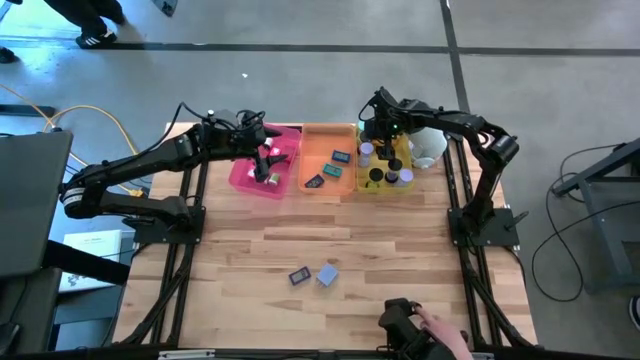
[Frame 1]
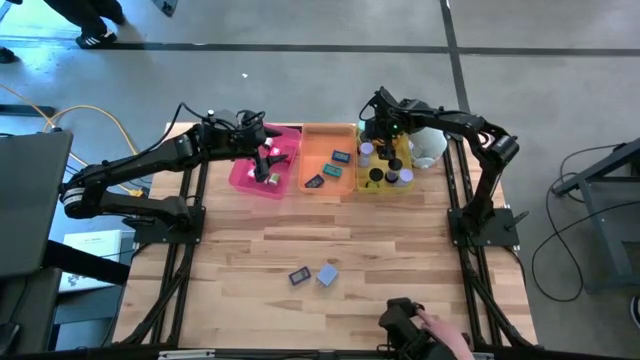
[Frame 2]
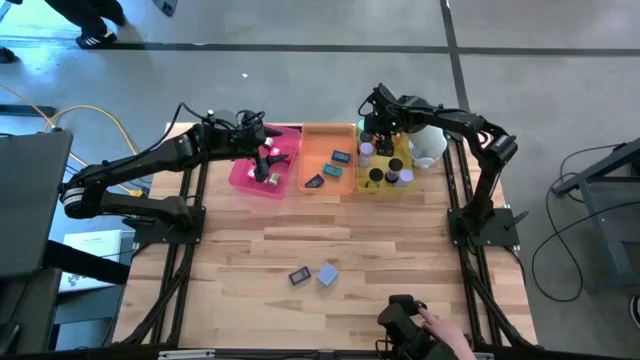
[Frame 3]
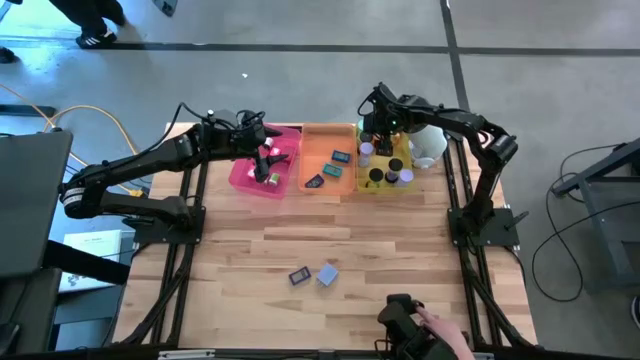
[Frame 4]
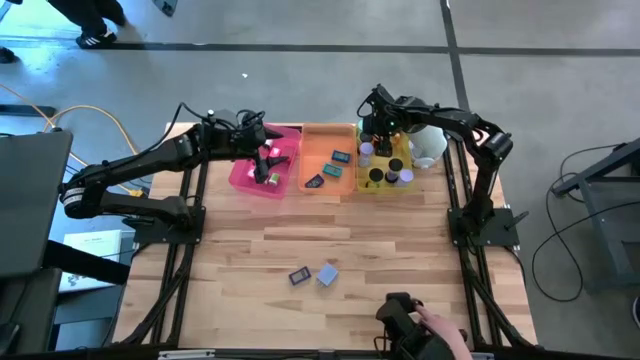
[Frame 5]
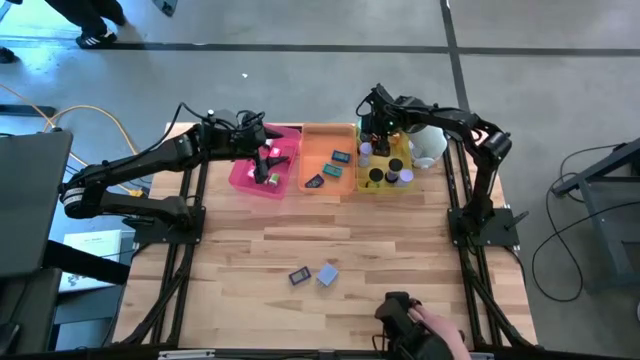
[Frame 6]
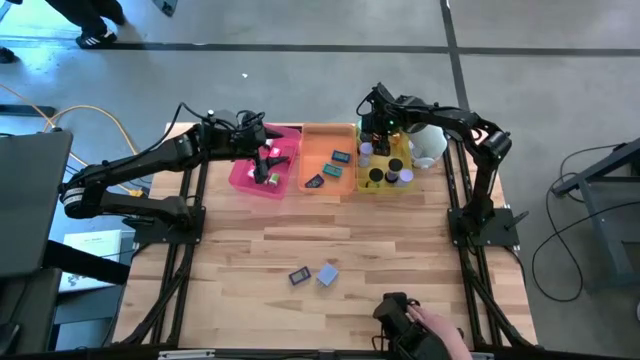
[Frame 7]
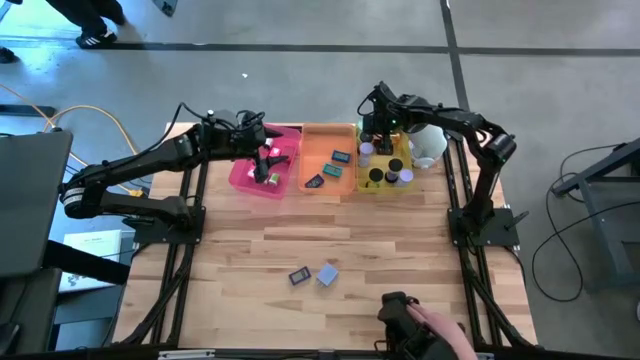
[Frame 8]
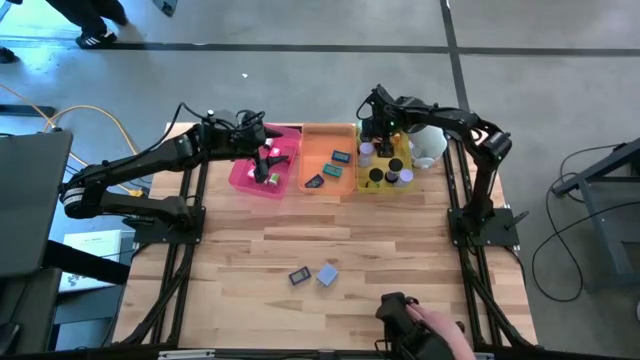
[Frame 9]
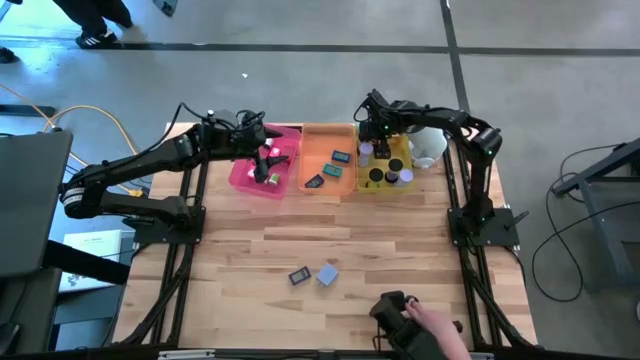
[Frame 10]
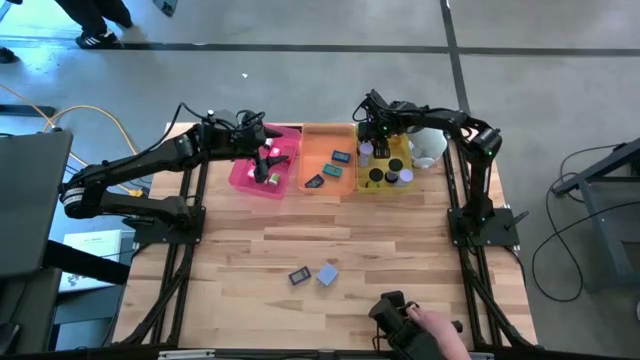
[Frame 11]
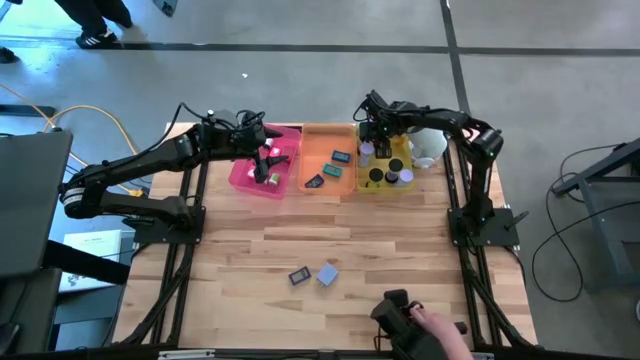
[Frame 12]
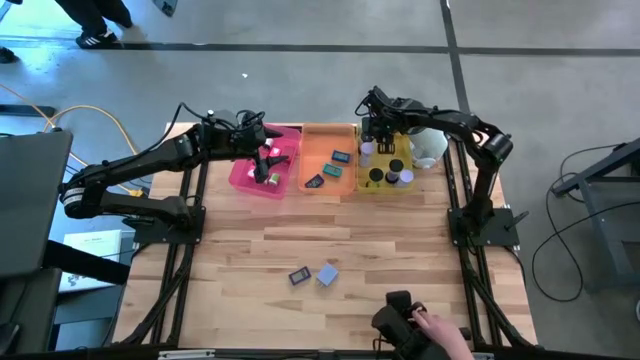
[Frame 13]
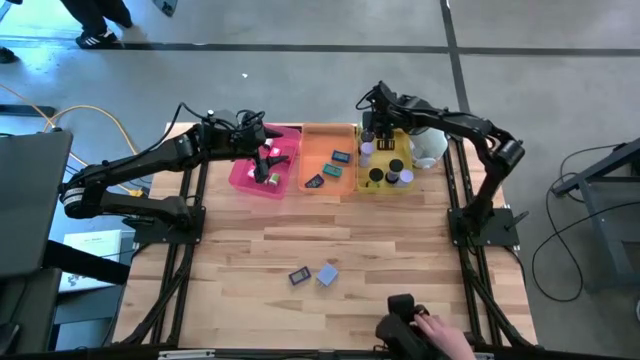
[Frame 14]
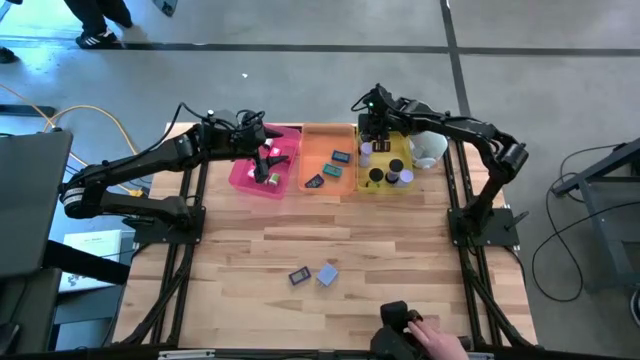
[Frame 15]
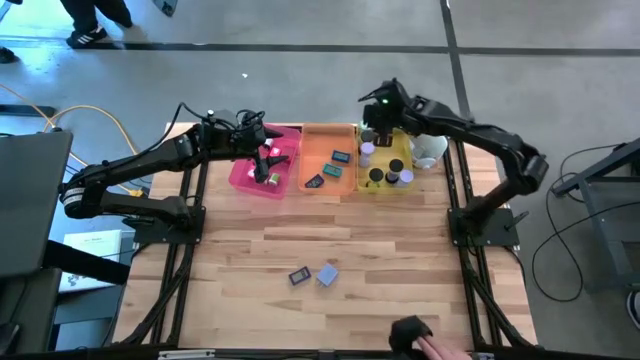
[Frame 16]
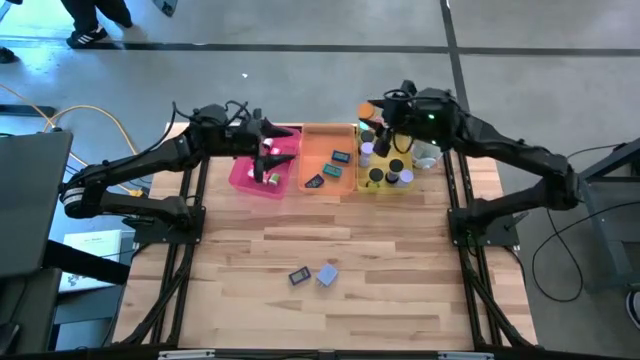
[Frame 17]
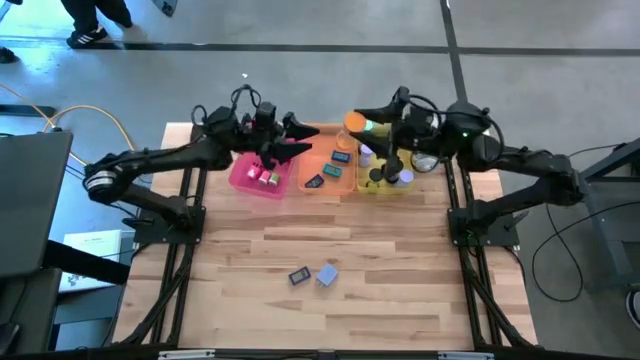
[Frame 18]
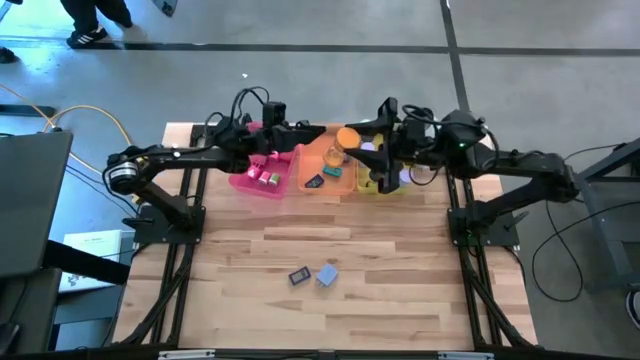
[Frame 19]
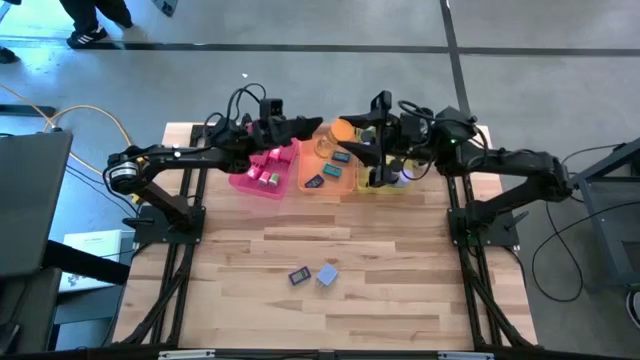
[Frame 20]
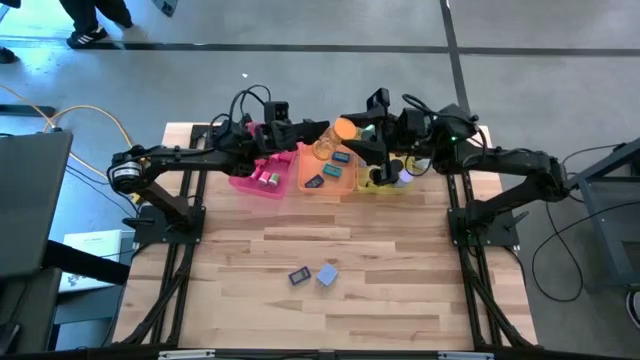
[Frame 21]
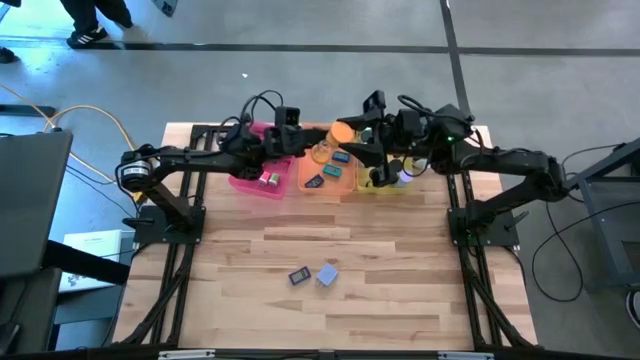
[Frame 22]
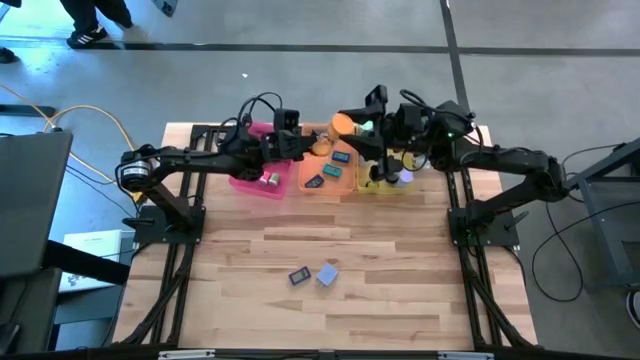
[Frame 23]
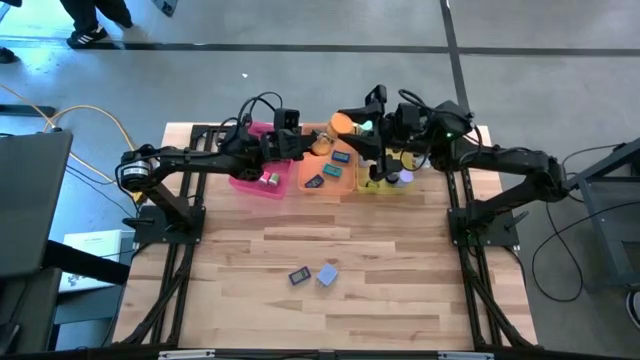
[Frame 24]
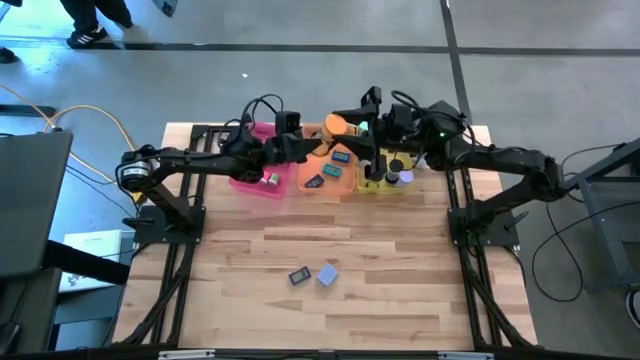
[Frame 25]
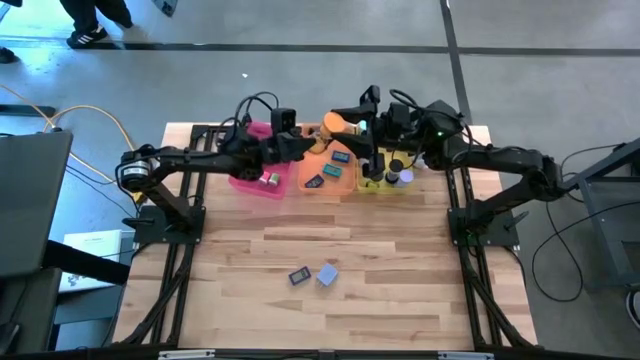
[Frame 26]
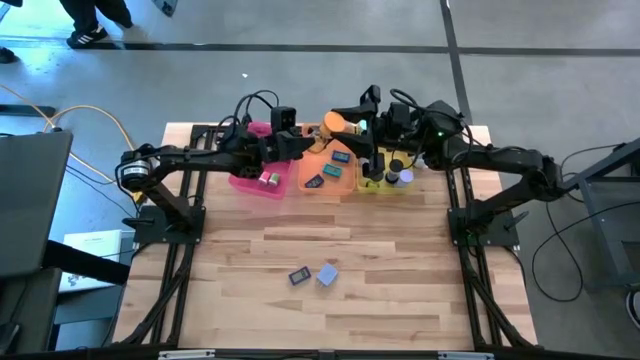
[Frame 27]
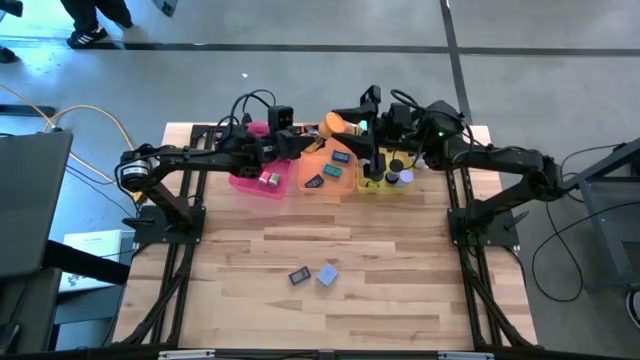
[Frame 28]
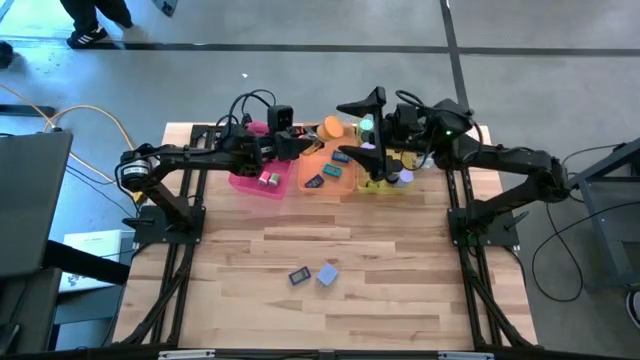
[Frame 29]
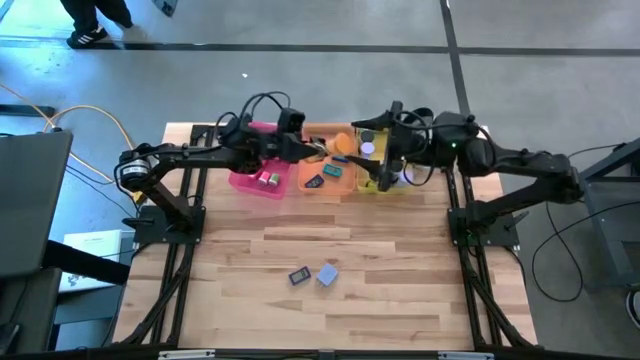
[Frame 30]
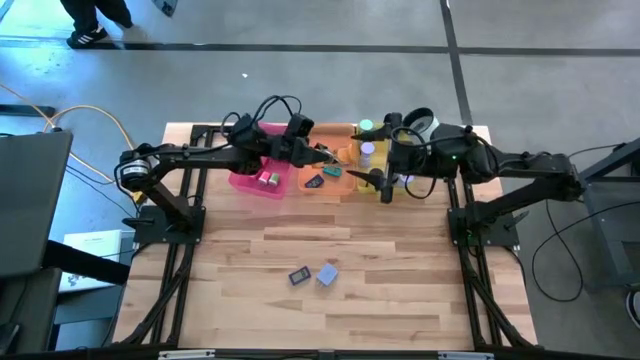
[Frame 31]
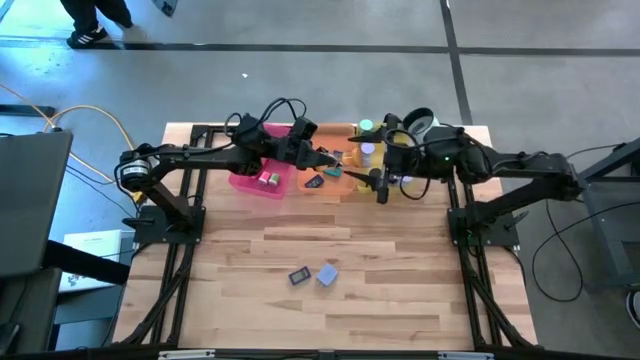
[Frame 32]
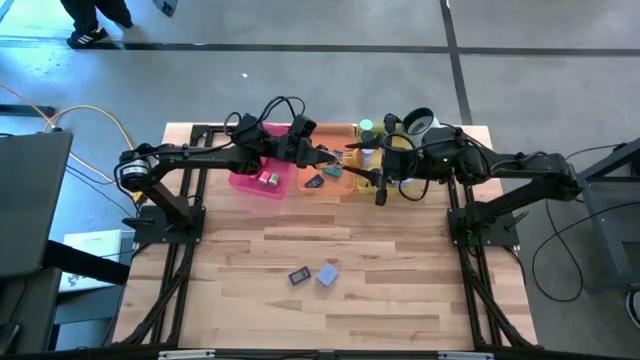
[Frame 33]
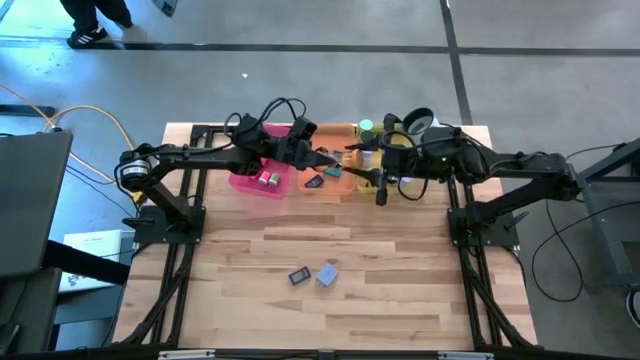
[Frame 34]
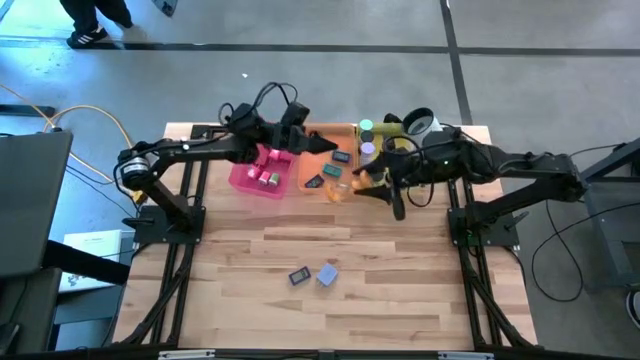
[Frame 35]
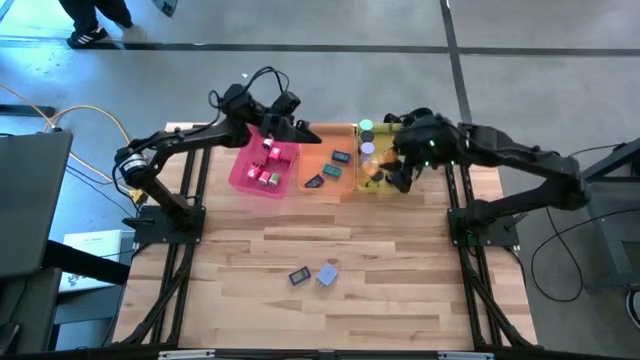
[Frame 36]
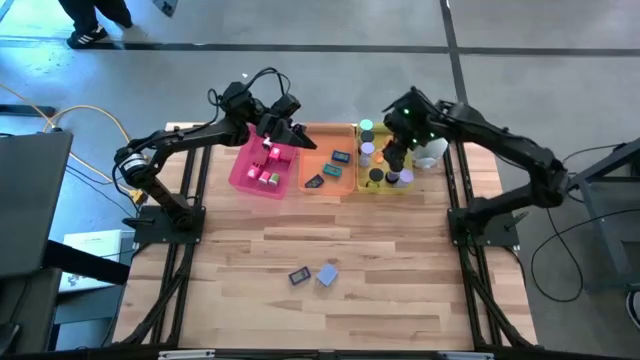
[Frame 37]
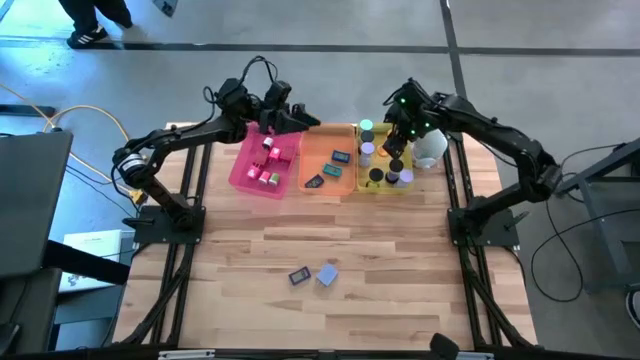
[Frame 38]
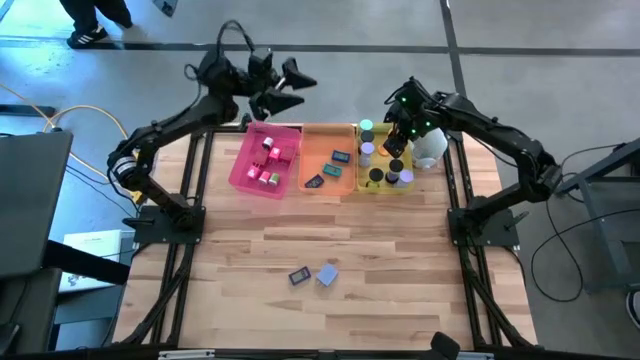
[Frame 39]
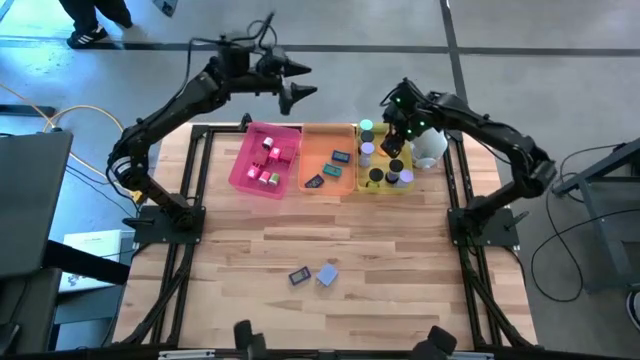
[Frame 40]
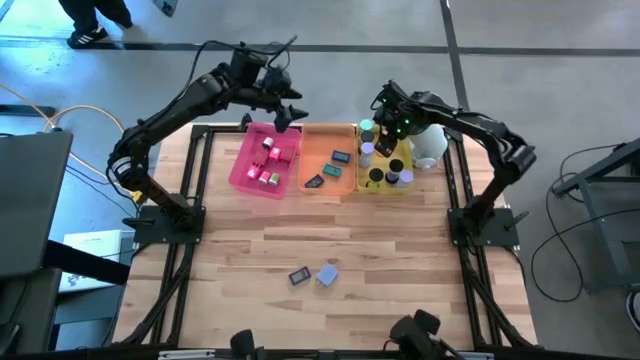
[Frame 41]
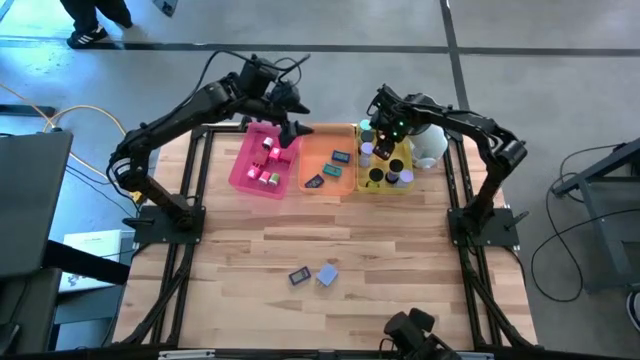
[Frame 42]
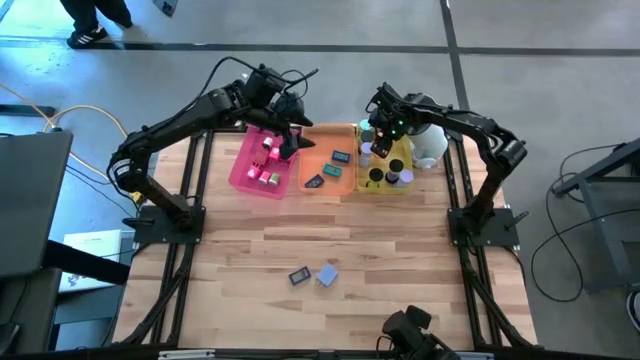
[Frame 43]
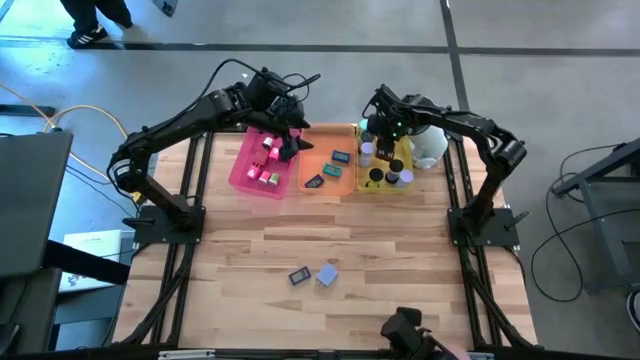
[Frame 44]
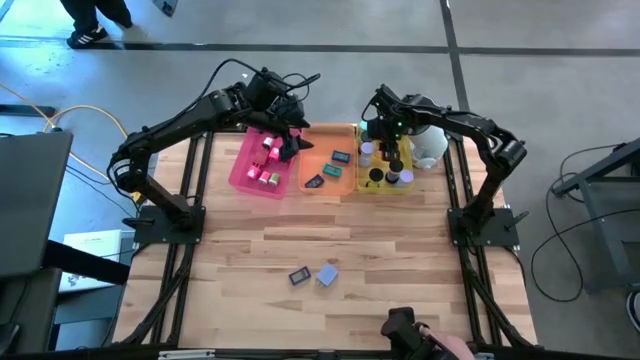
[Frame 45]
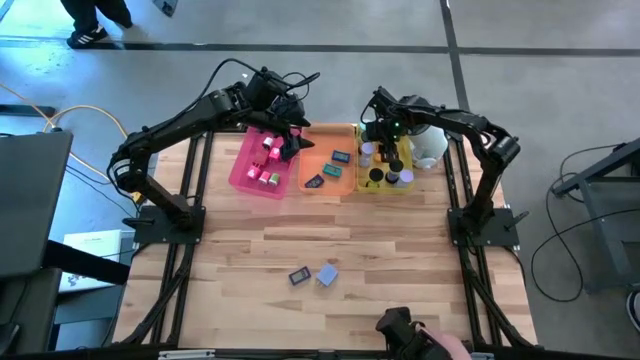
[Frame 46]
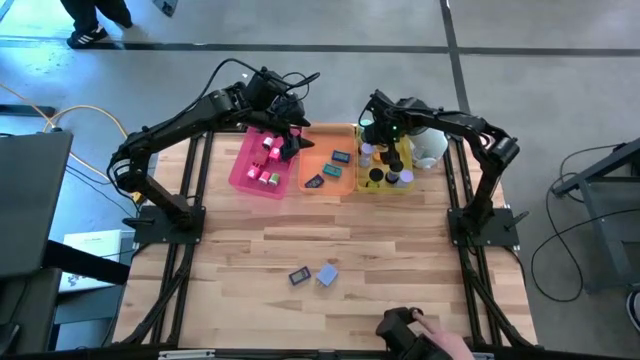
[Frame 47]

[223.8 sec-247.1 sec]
Task: Pick & Place Office items
Put the yellow hourglass into the yellow bin
